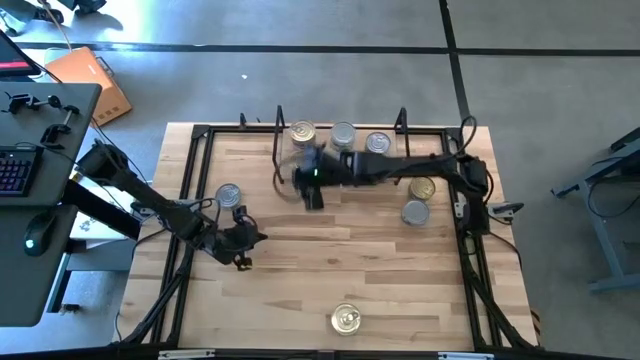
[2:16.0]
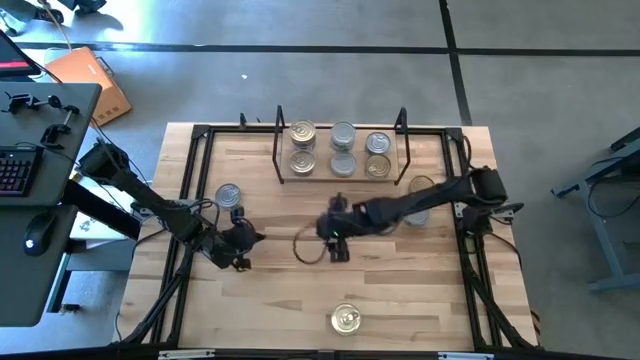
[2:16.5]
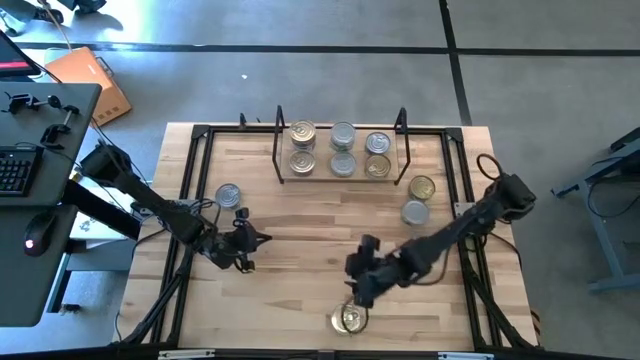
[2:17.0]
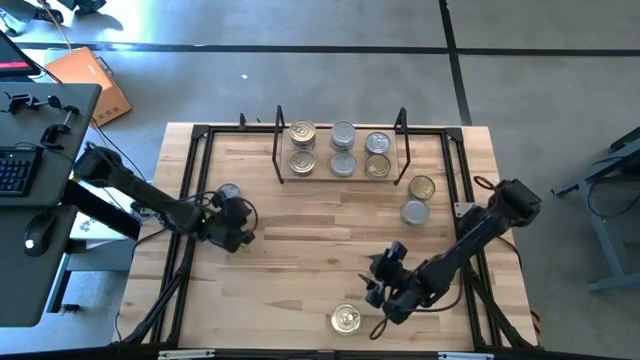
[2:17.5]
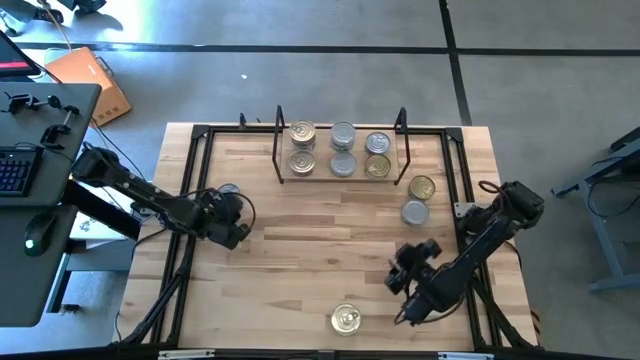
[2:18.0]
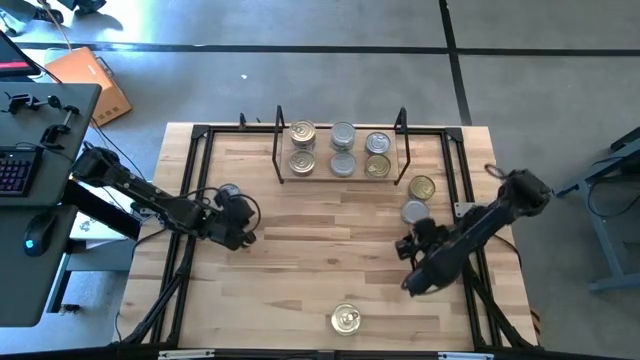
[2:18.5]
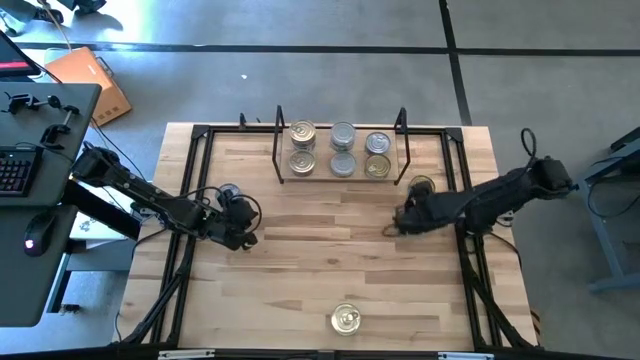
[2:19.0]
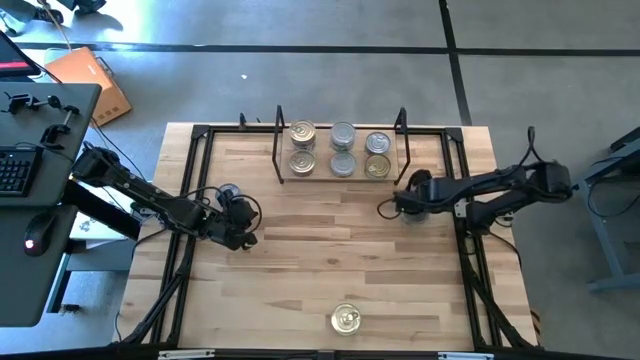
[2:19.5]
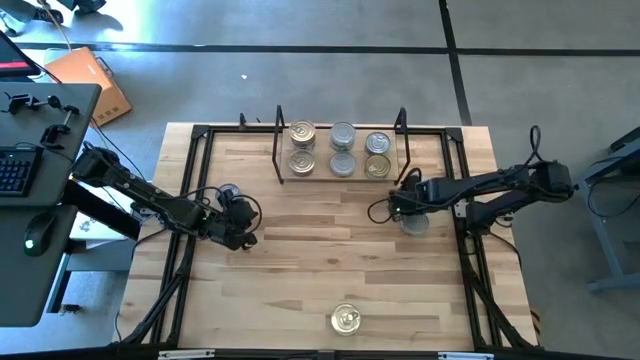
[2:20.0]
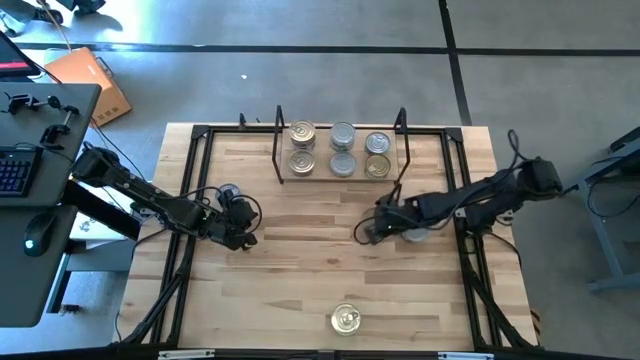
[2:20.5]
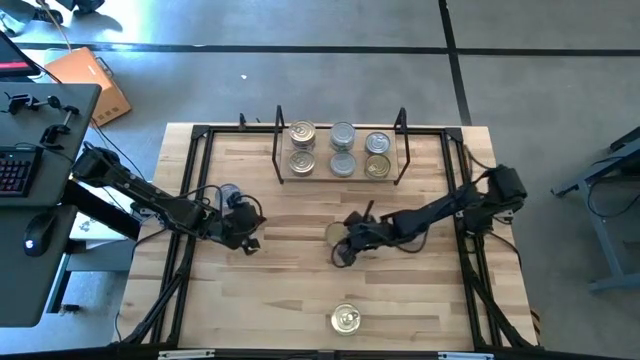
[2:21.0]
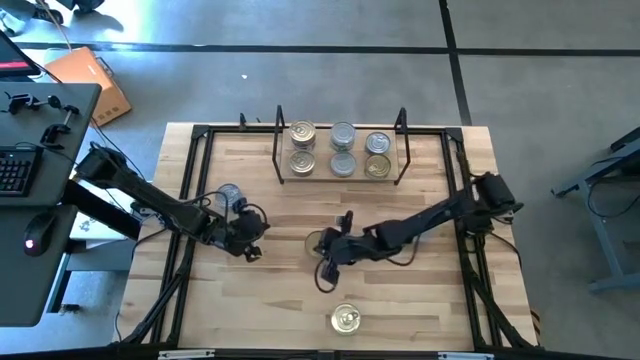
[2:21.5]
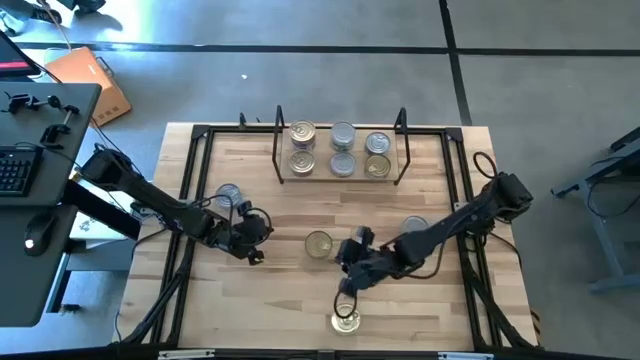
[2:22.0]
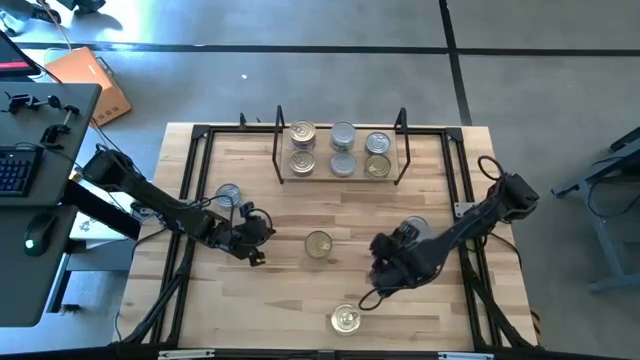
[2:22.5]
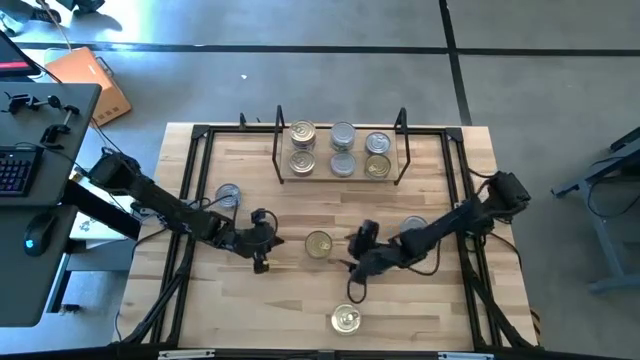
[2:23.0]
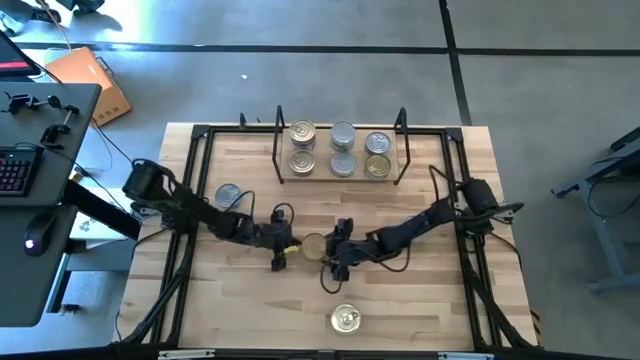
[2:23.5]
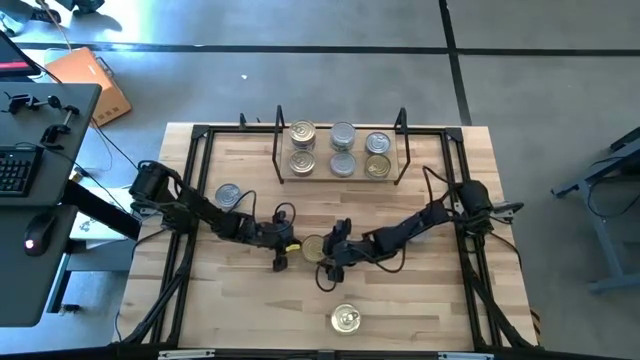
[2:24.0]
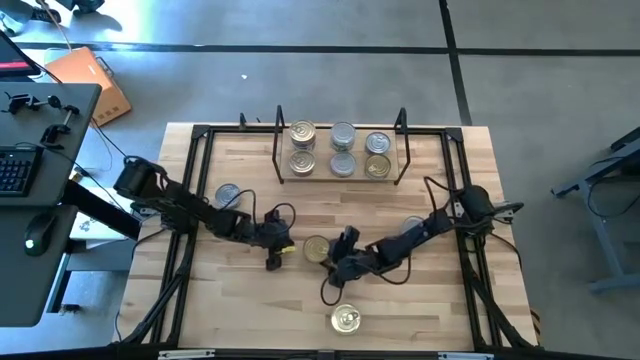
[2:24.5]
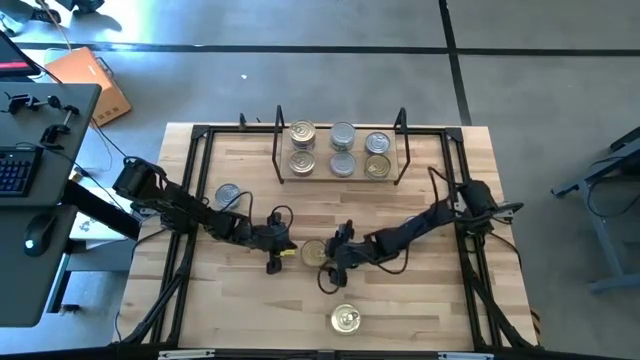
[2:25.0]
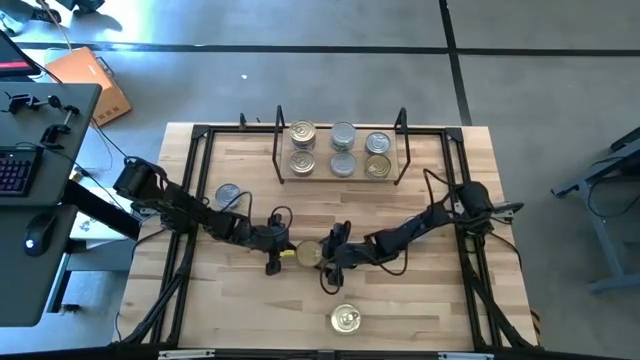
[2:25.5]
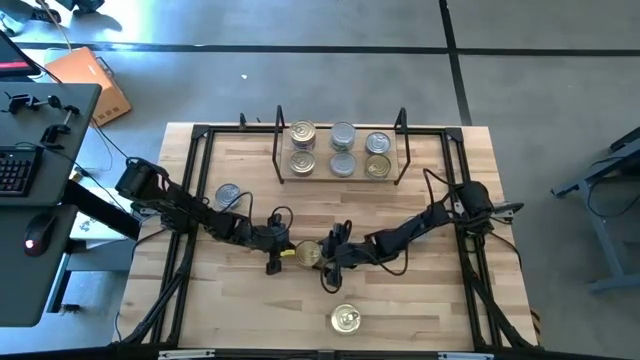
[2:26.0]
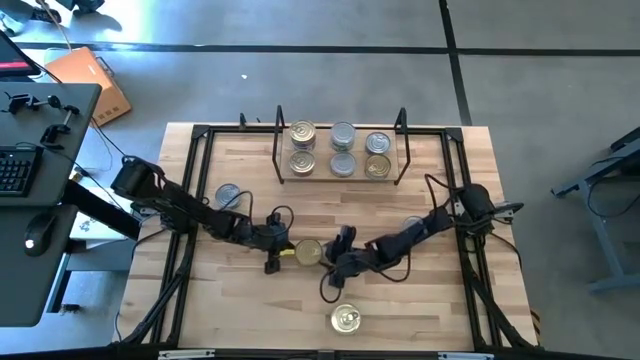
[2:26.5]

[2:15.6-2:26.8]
Task: Stack canned seafood by type on shelf
Stack the green tuna can on top of the green tuna can on the shelf

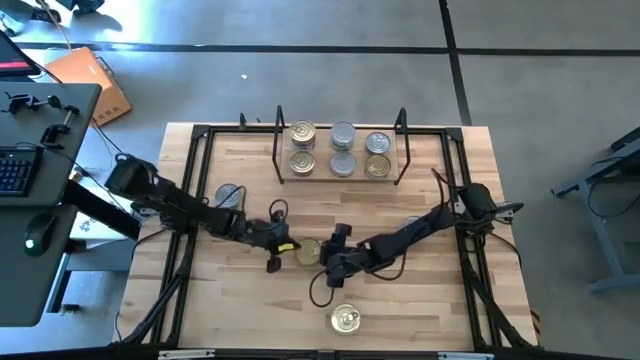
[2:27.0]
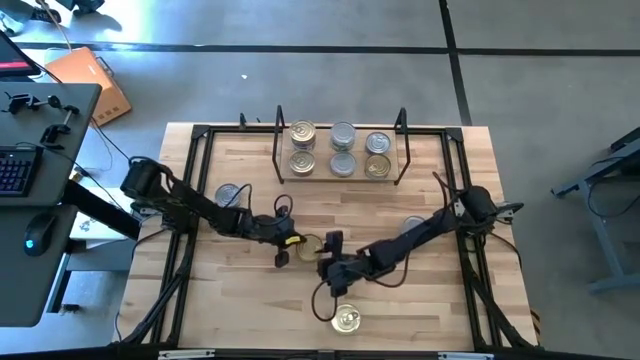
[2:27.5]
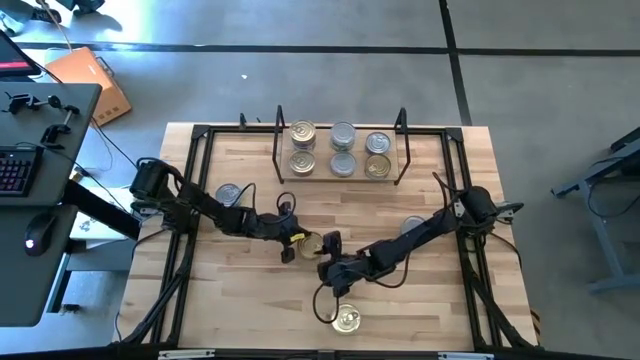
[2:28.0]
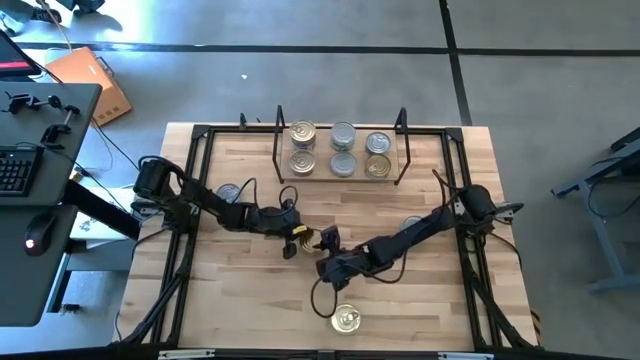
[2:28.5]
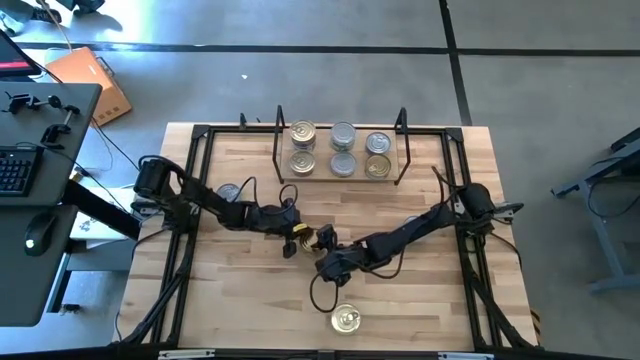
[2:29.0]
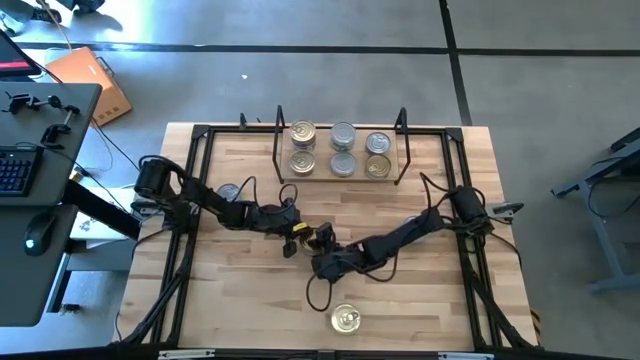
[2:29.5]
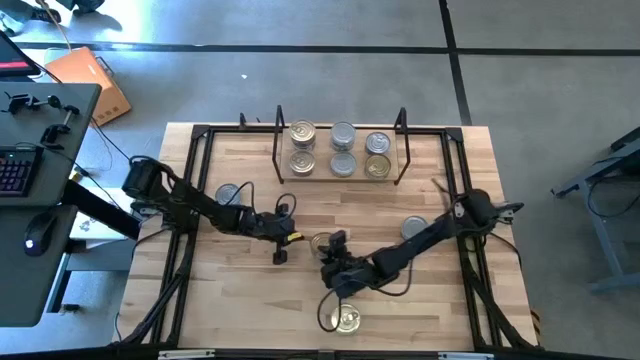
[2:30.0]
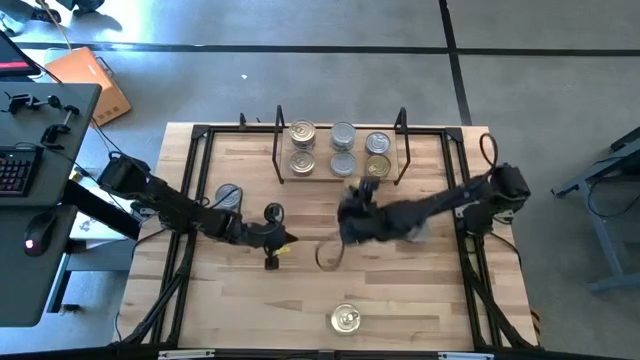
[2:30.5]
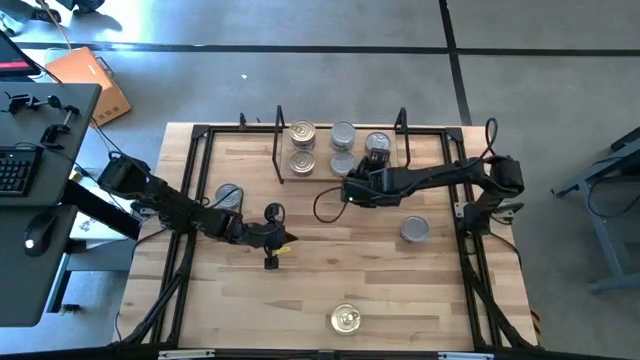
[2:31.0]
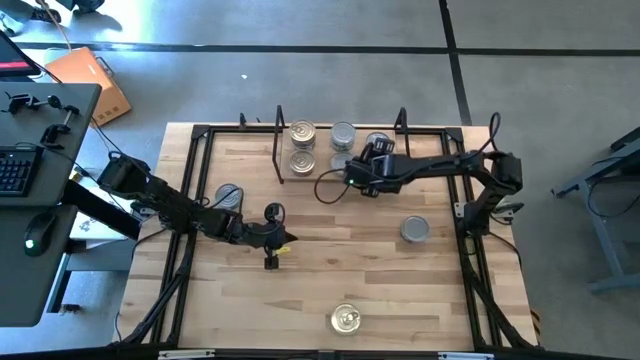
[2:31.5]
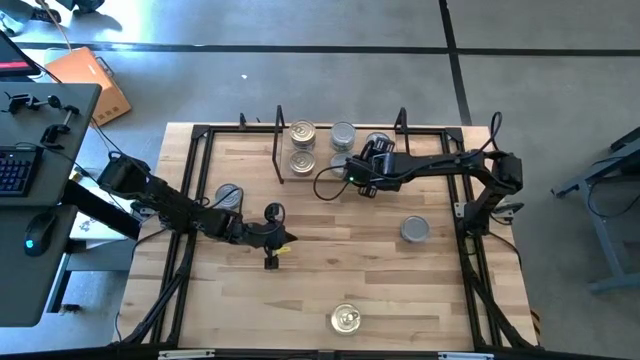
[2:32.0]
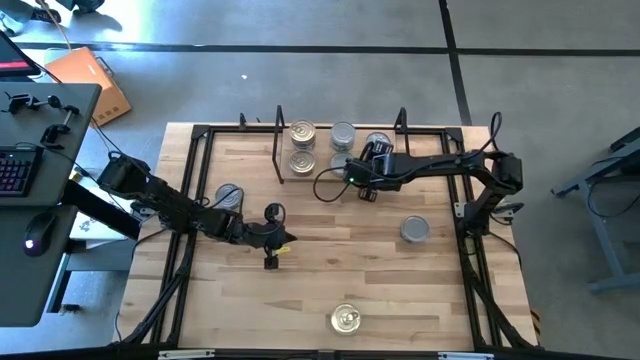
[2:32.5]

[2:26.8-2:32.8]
Stack the green tuna can on top of the green tuna can on the shelf

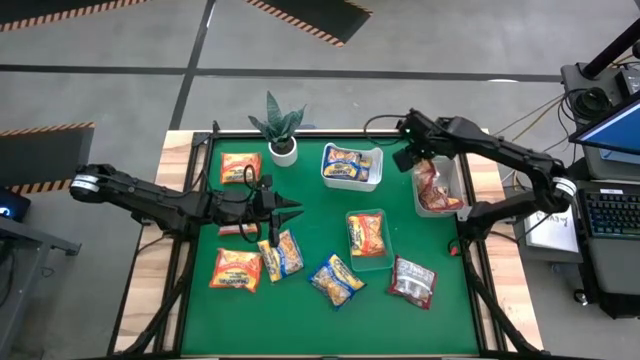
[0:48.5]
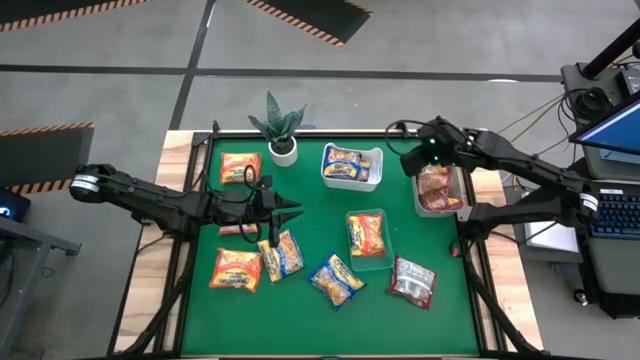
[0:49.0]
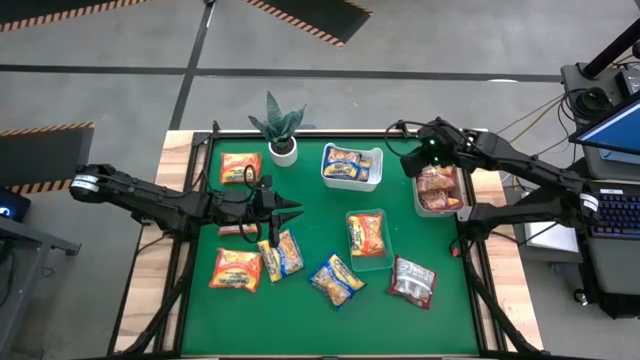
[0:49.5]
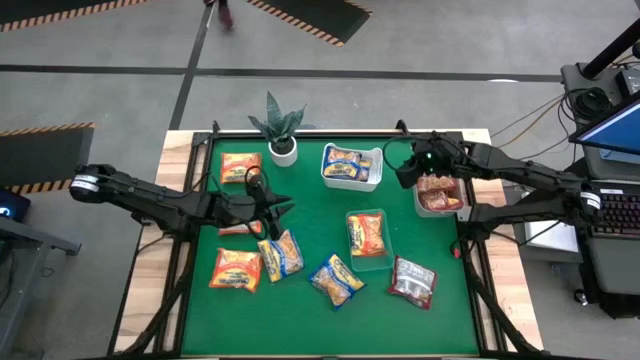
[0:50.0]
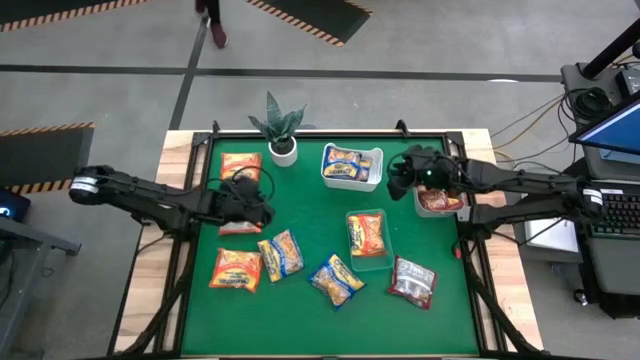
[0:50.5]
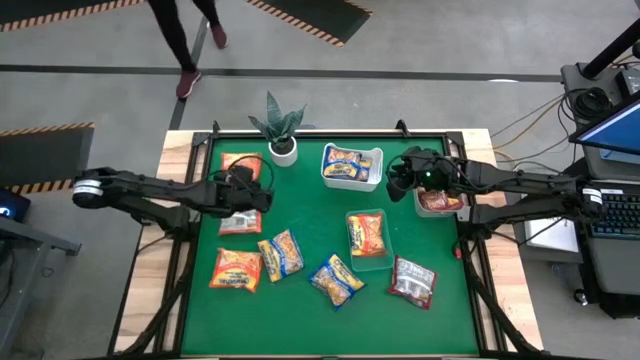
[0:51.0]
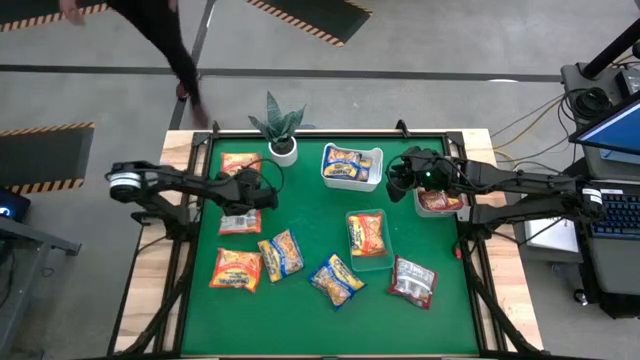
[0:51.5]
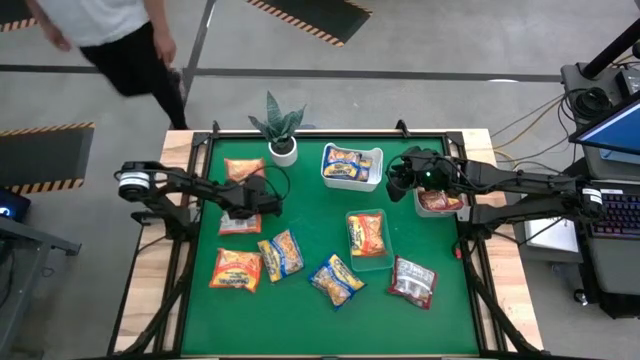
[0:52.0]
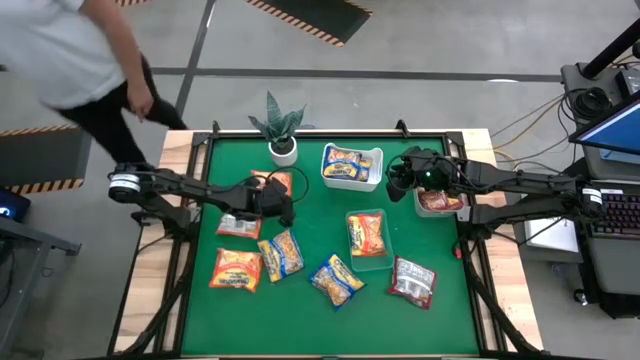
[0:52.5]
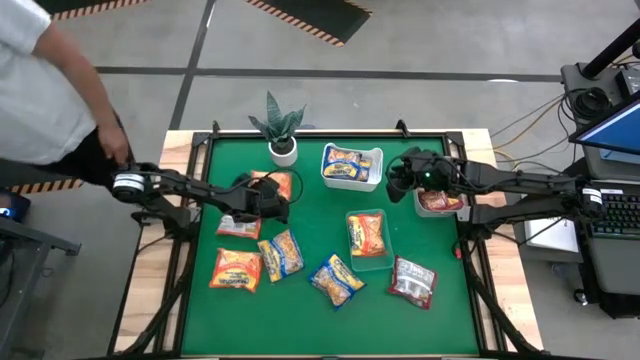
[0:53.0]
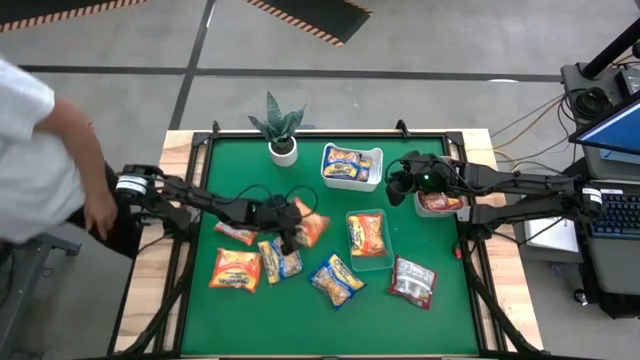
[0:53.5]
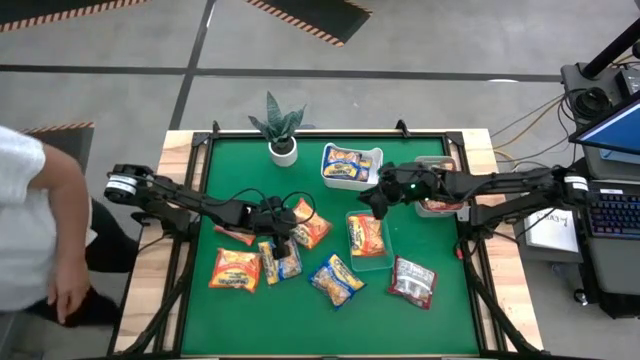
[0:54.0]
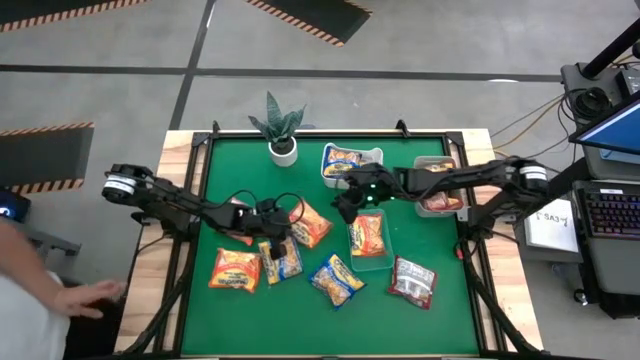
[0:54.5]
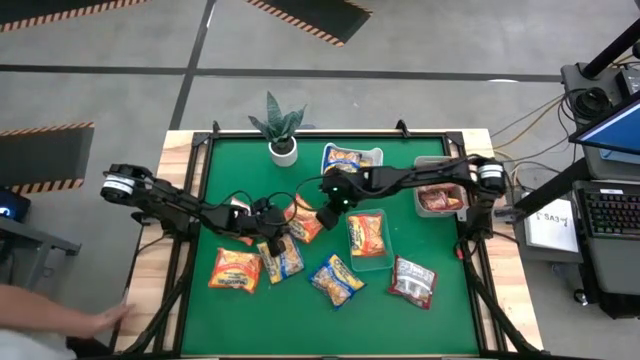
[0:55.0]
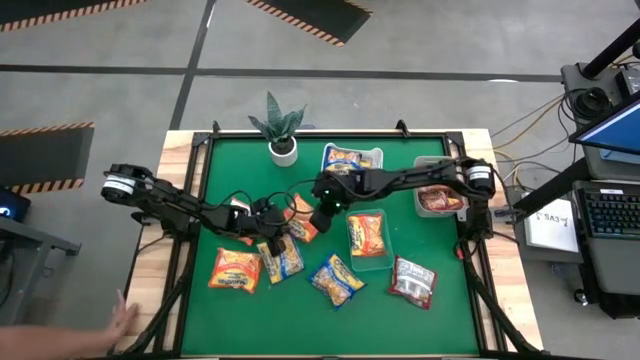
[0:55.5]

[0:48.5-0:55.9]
Task: Sort Maruchan noodles
Put the orange noodle pack into the green bin
